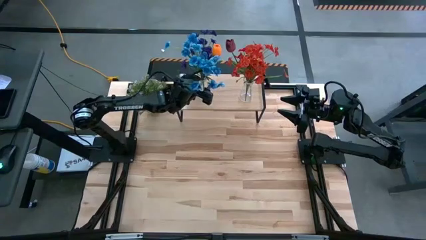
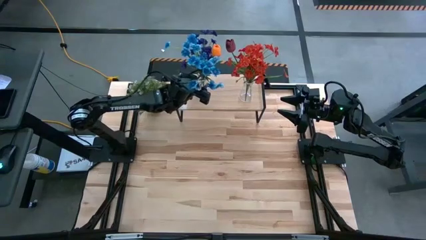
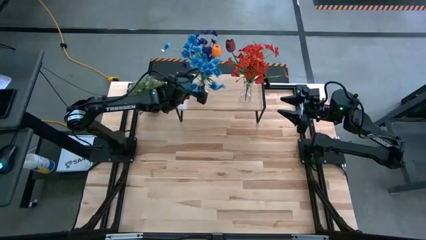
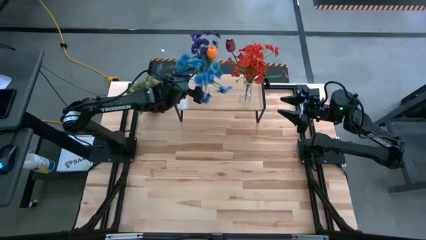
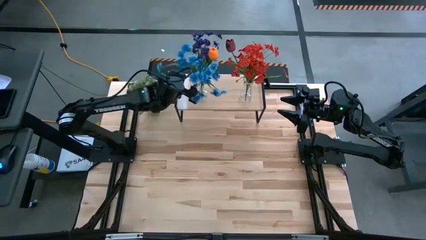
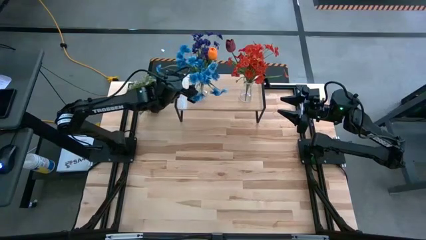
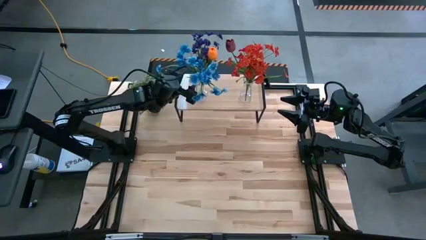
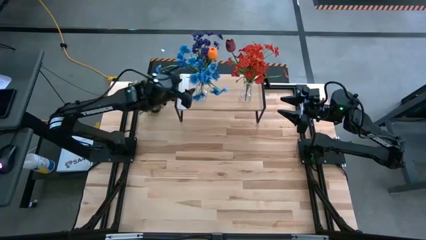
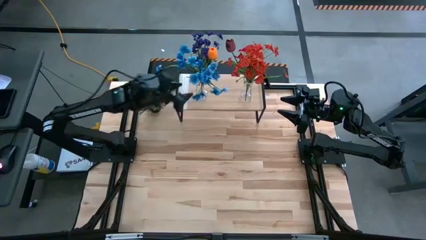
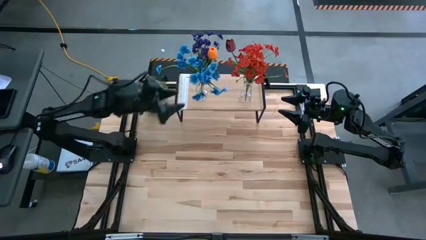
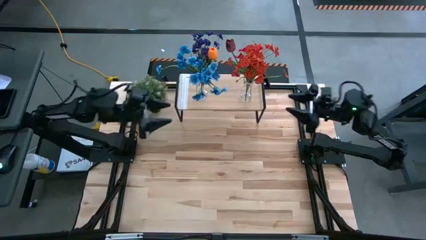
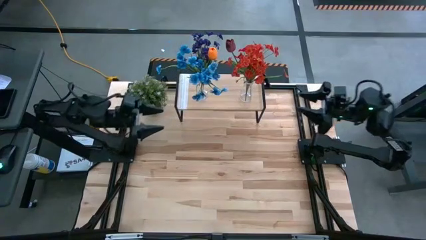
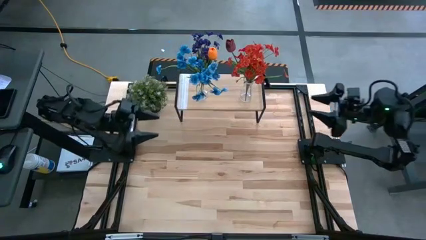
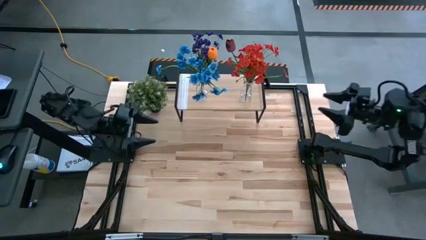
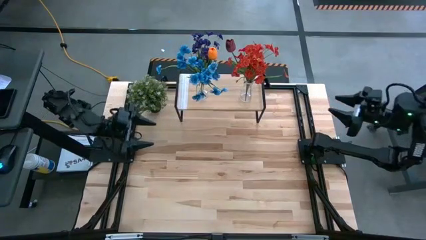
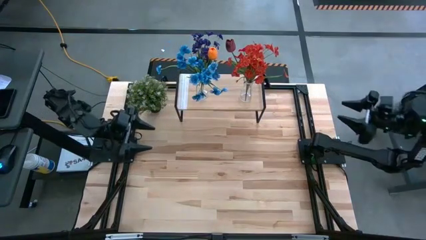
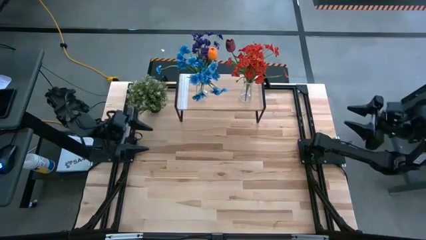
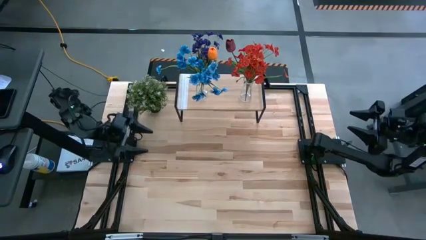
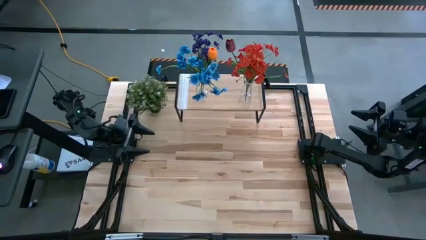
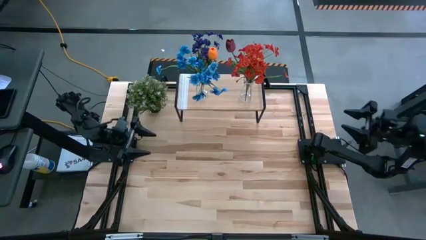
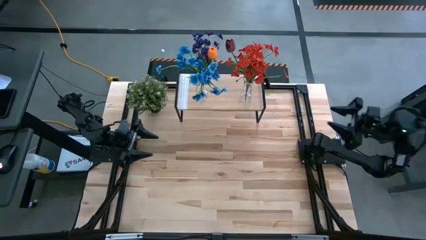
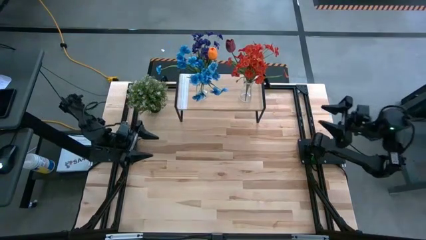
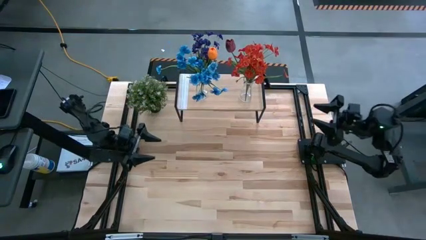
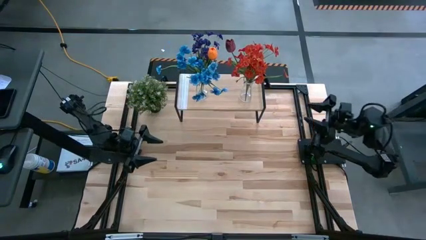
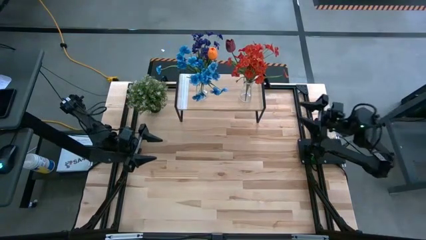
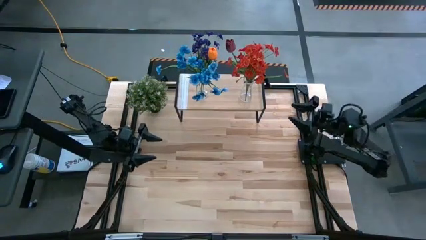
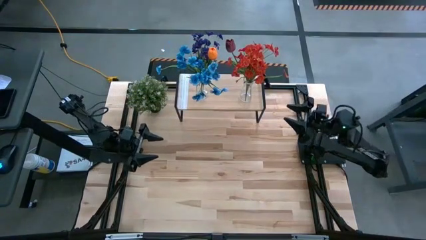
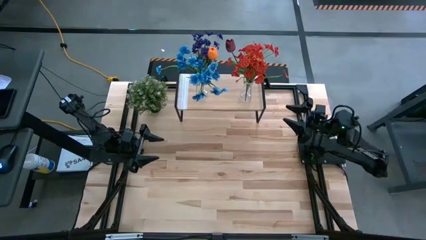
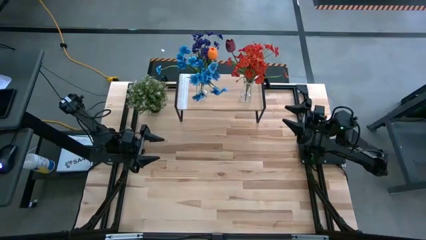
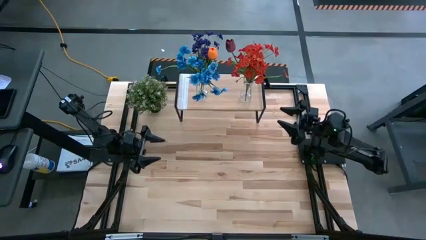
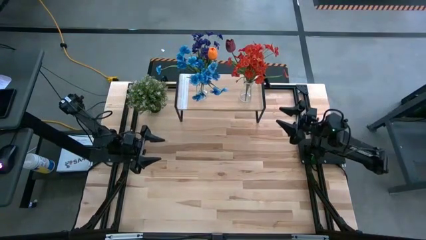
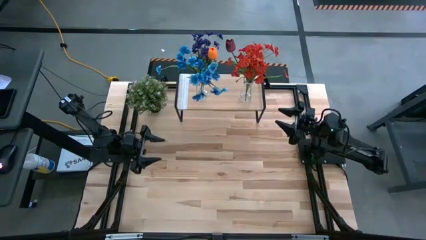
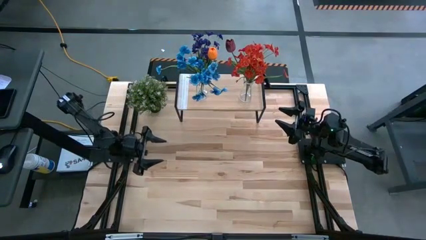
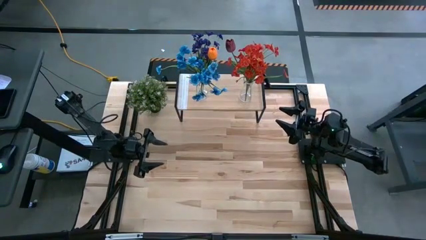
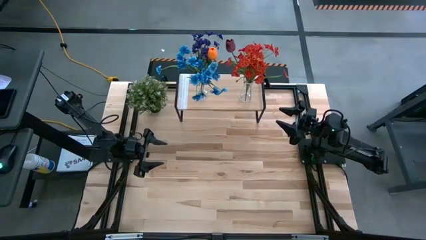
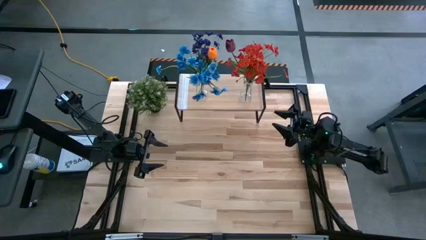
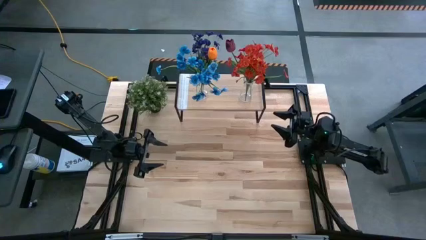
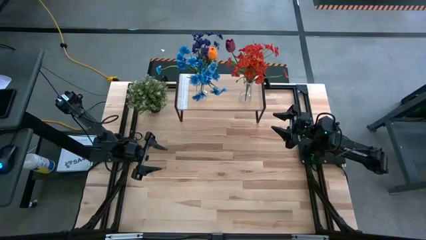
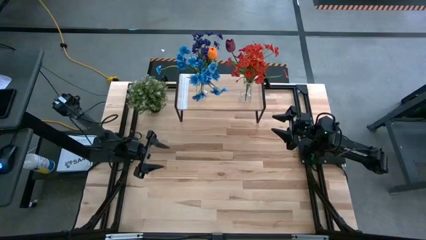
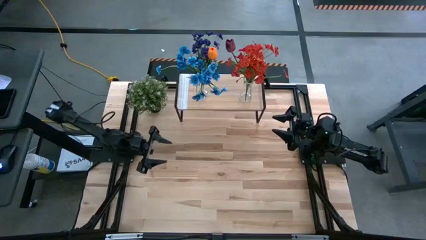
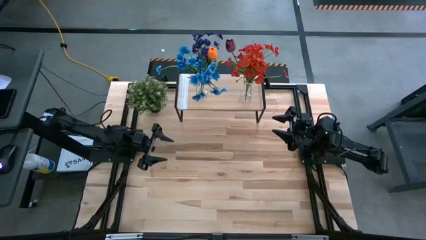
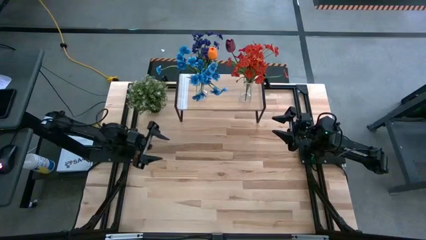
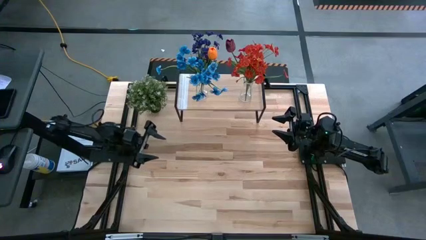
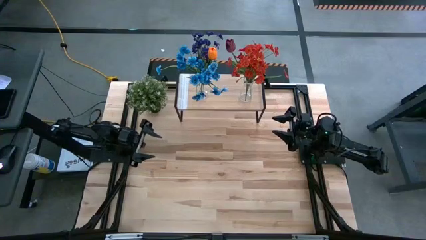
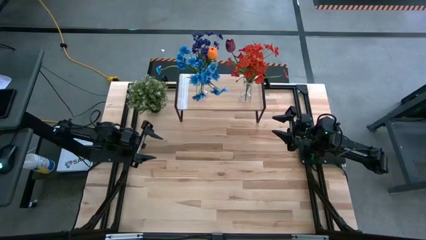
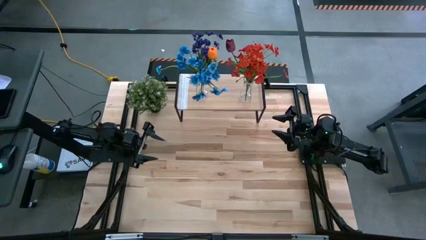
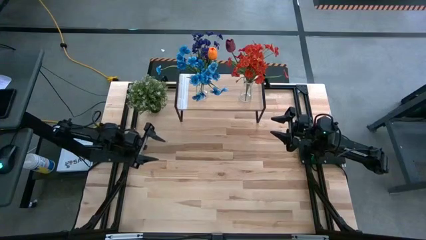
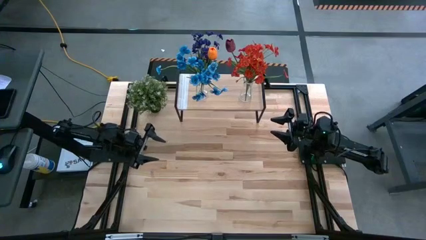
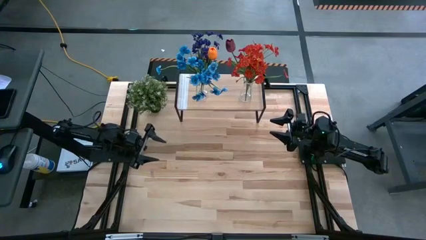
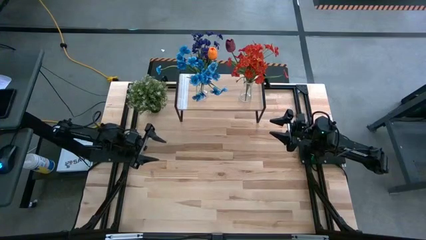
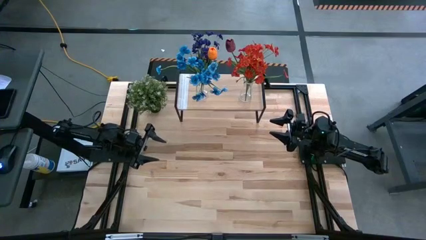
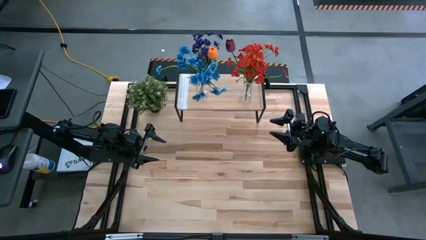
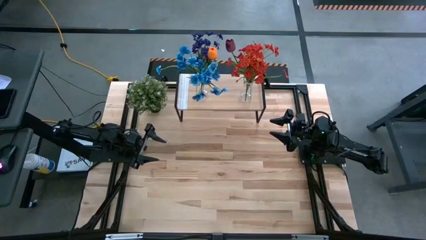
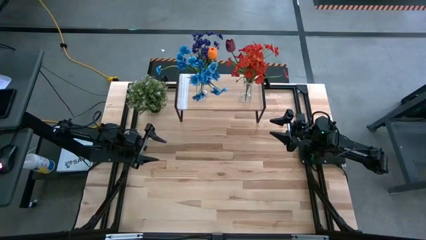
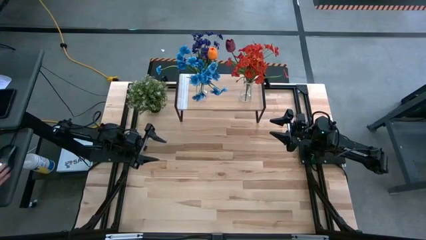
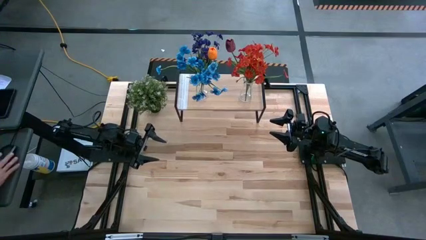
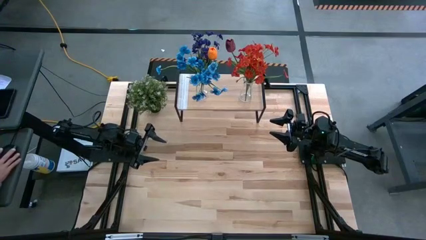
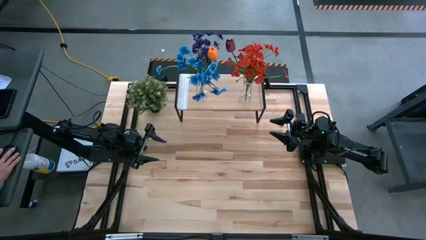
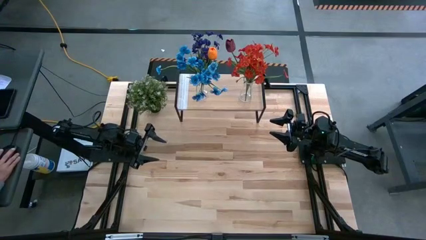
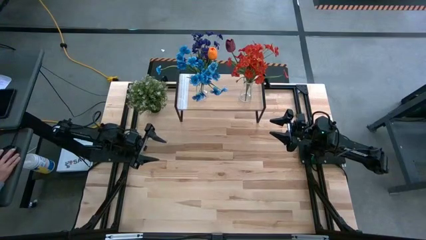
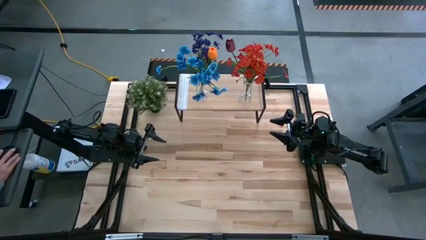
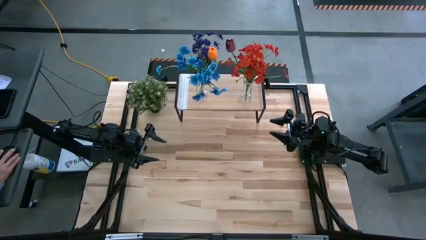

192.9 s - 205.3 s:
Task: Pick and place flowers into a vace then onto a shelf
Return to Home Position
